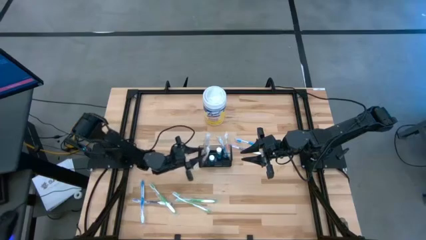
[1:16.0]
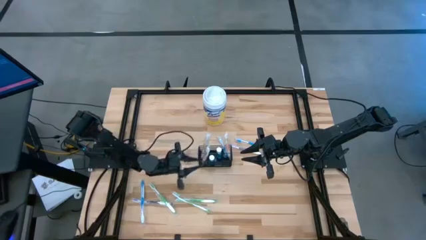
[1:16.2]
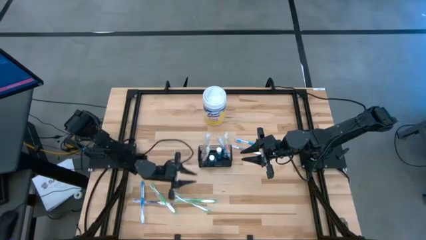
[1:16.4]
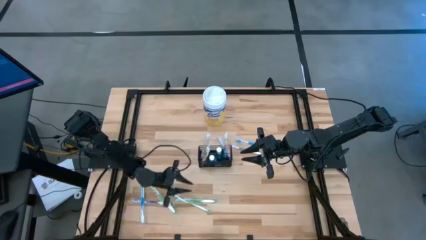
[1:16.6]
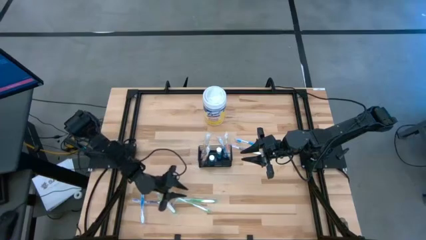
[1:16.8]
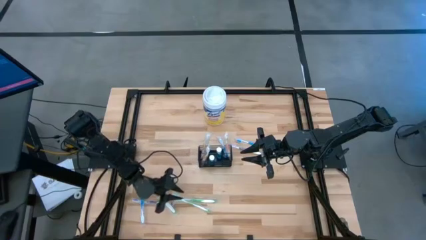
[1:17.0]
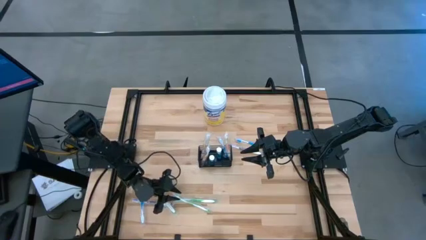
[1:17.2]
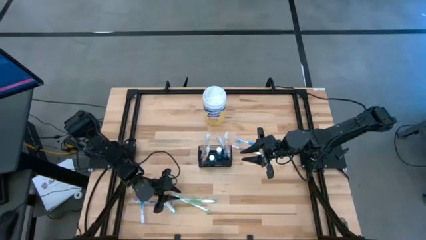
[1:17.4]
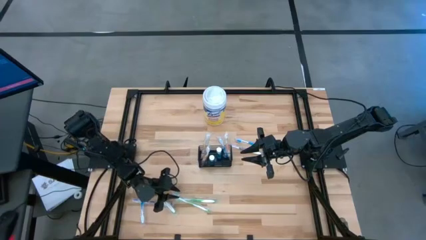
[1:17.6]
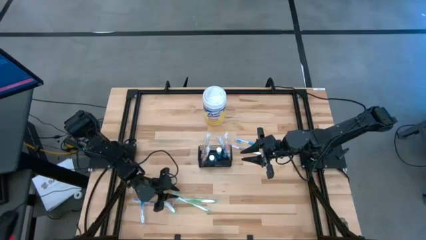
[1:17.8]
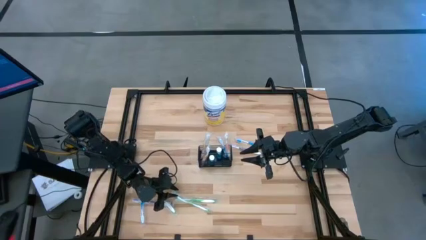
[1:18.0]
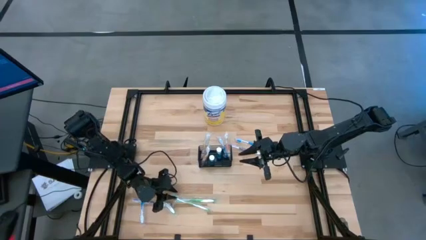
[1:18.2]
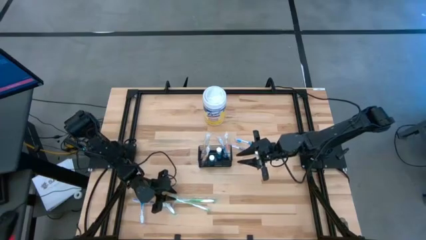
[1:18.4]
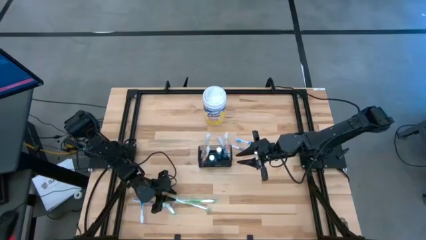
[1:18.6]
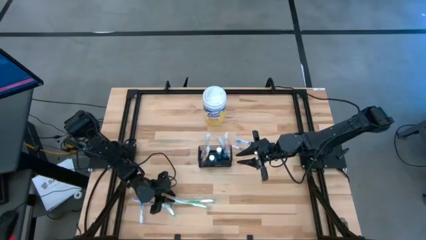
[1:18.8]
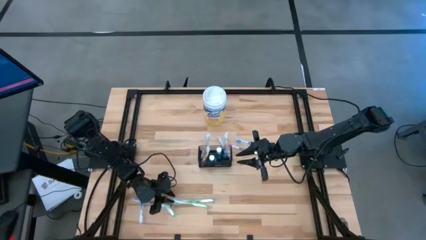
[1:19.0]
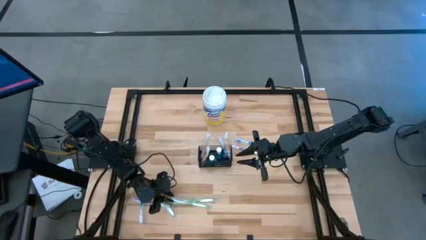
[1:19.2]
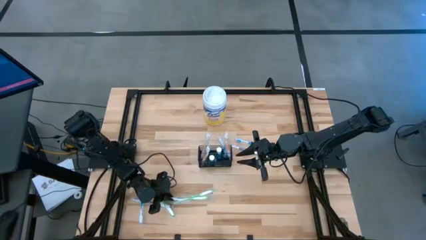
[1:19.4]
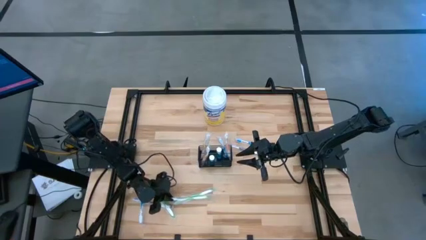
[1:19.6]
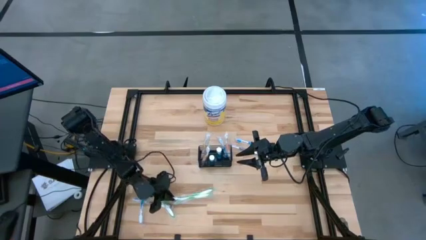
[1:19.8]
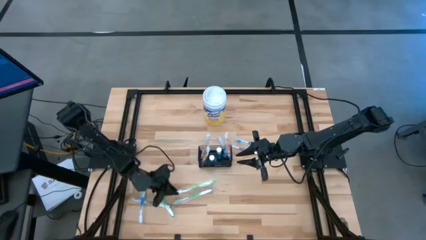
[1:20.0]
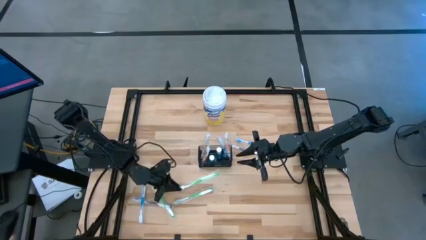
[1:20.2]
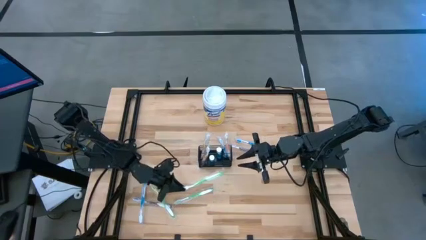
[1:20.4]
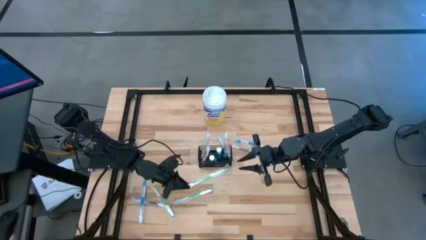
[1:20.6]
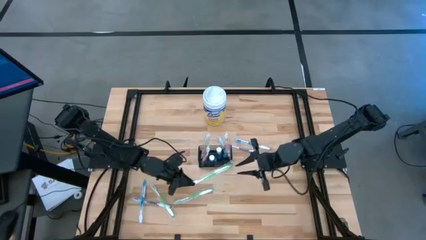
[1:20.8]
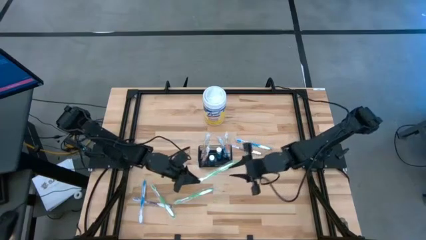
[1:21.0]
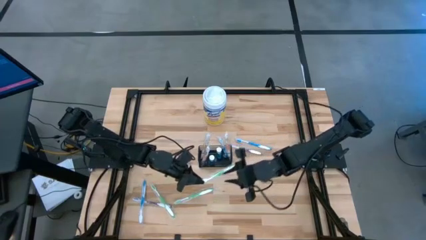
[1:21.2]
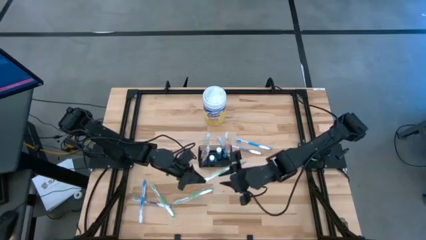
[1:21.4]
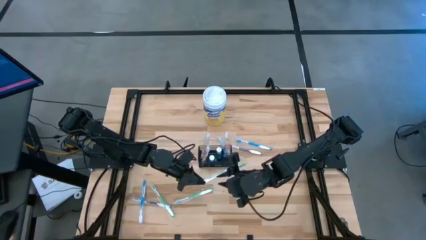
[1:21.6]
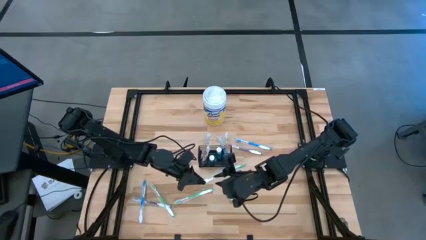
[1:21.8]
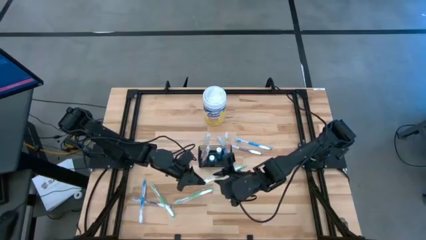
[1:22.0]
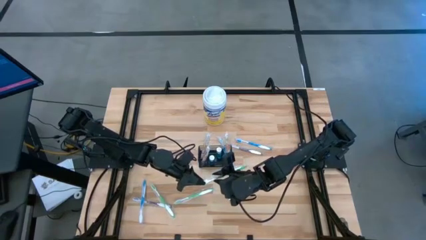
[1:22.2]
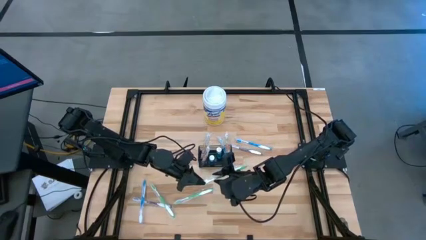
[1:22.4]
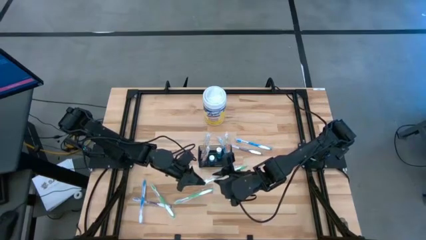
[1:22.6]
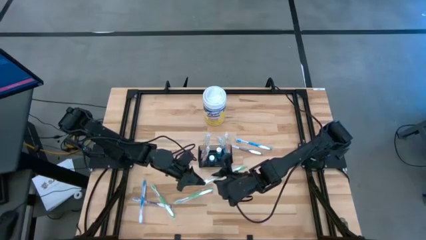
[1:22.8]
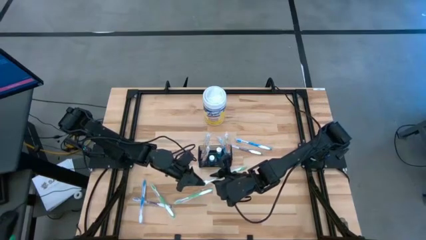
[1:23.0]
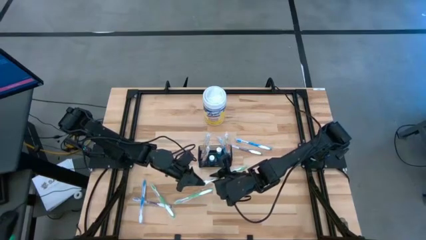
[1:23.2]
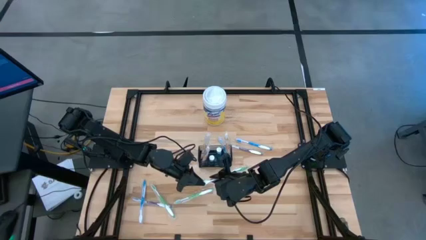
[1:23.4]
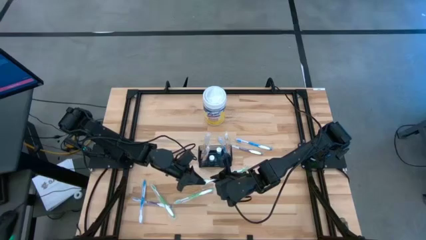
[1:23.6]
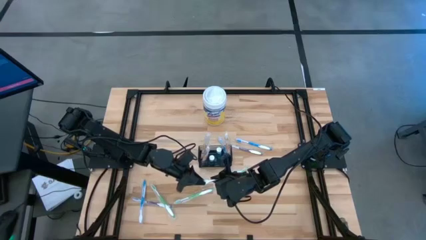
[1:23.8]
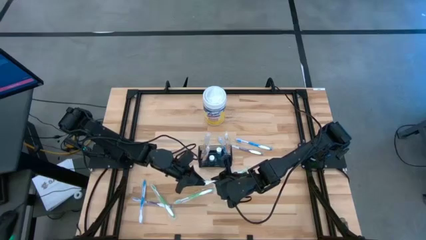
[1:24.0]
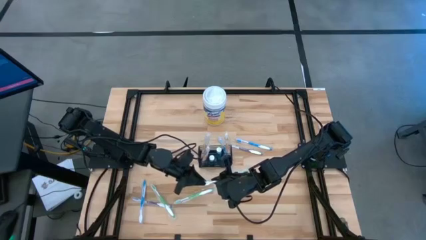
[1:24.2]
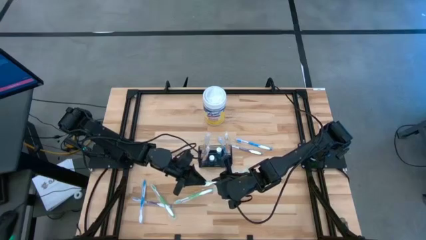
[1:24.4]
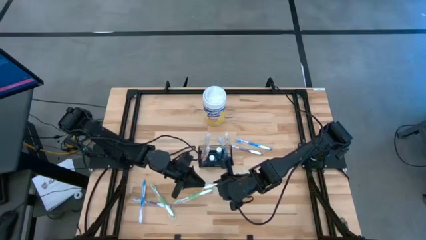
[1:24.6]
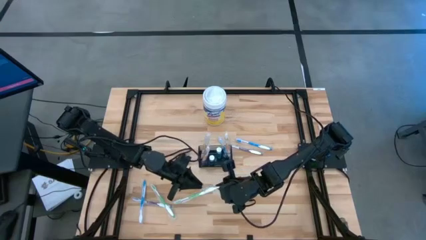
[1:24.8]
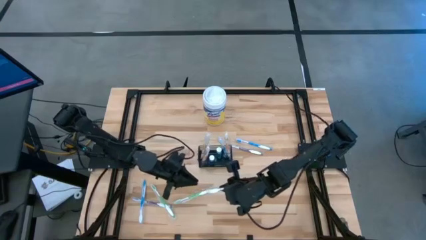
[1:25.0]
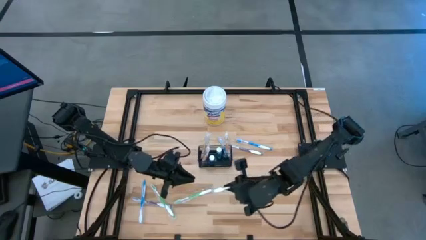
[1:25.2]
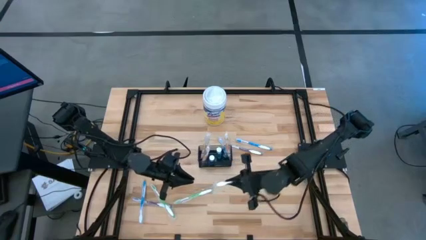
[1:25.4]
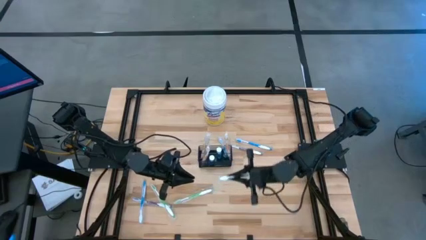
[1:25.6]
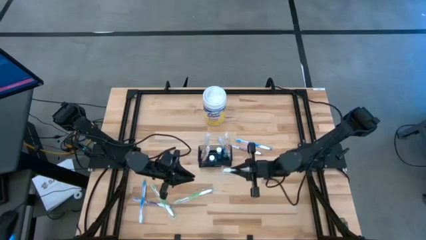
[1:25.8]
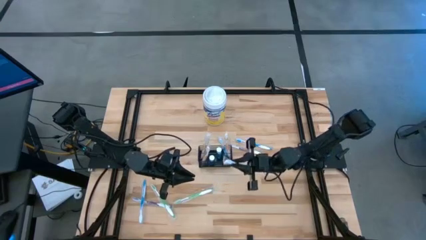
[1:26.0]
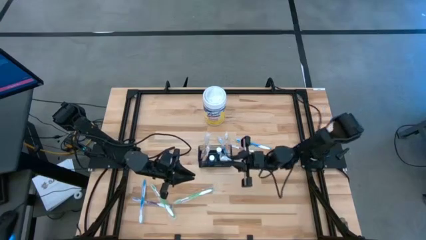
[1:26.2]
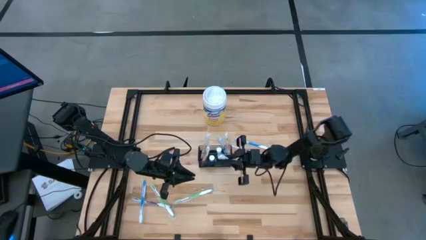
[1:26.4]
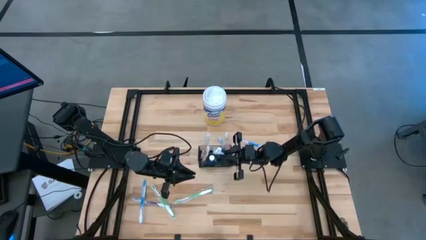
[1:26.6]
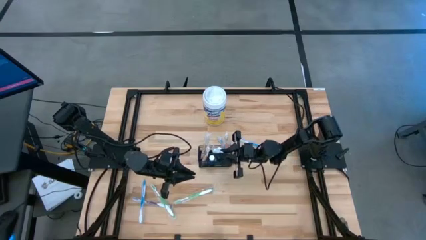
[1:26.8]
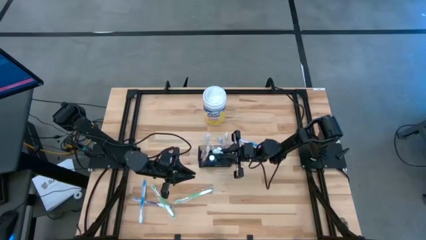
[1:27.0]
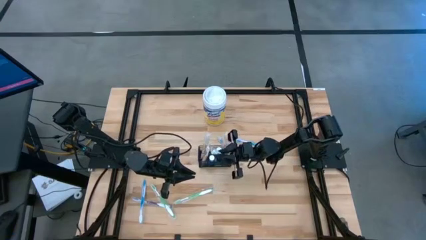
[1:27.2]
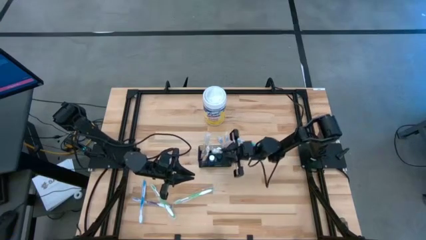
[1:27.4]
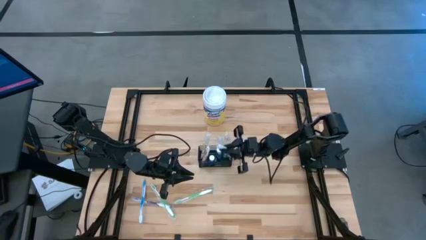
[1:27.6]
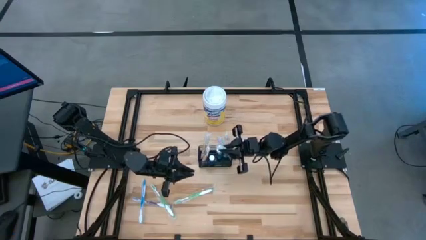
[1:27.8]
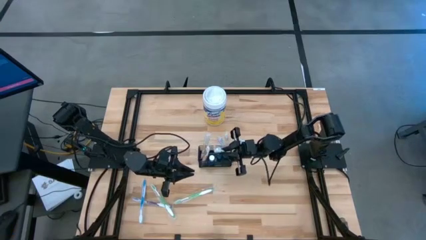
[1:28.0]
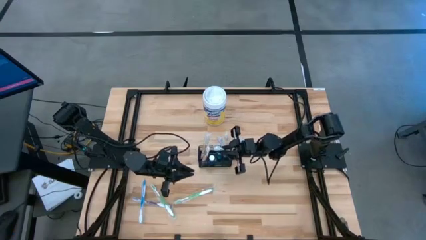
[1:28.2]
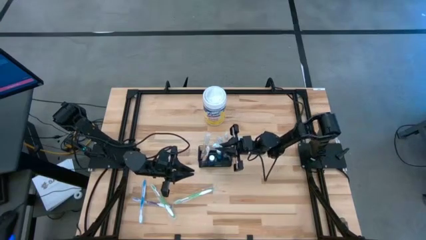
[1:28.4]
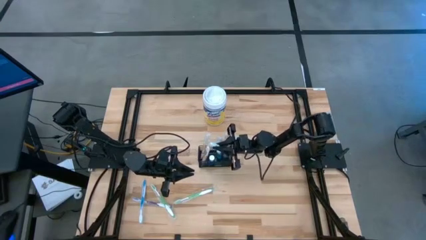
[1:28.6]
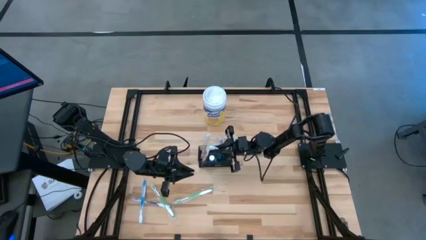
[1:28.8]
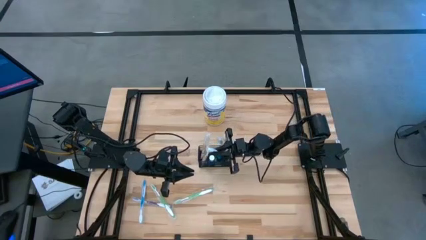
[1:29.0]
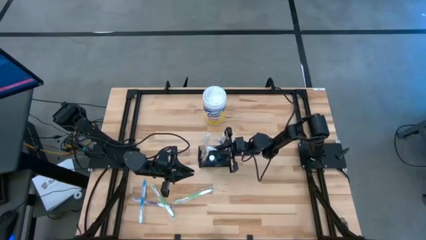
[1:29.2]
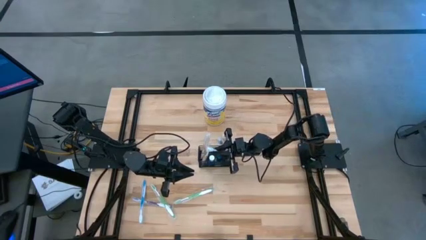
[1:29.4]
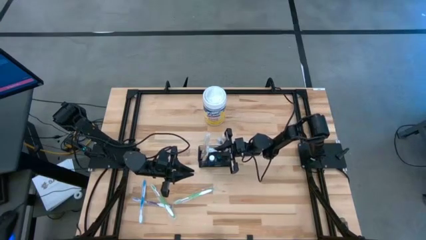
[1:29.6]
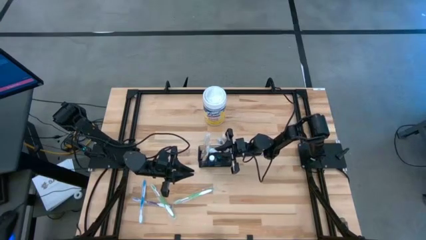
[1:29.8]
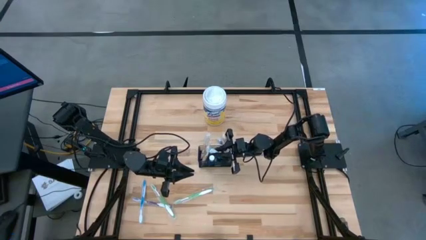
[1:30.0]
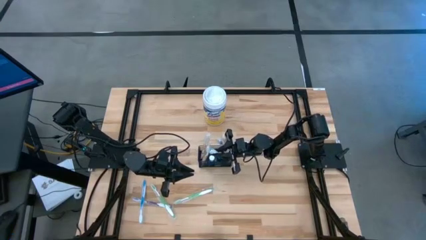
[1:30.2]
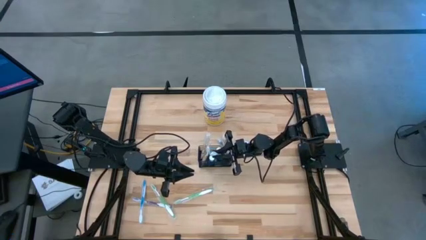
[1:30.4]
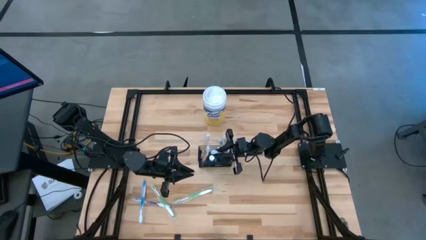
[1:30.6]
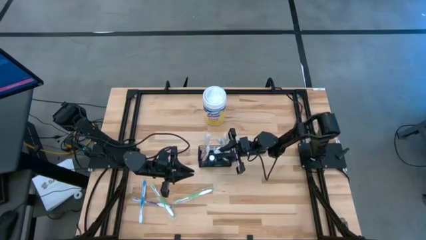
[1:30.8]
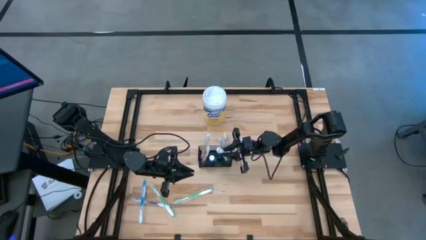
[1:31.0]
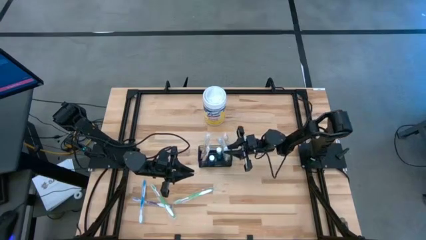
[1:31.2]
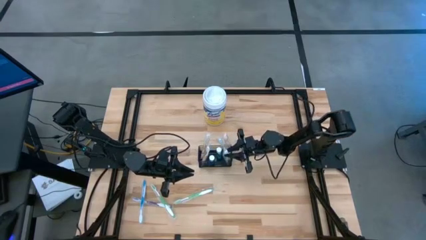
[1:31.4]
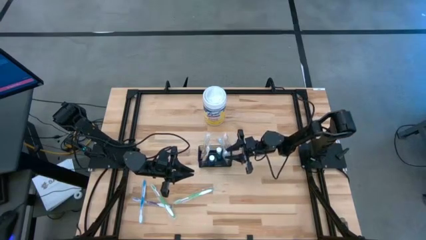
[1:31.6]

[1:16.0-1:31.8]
Task: Pick & Place toothbrushing station
Put the right green toothbrush into the mesh organizer
